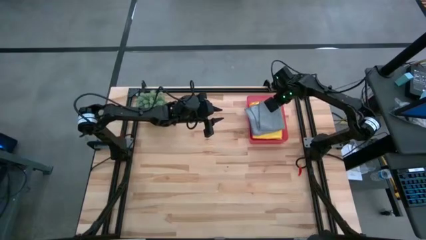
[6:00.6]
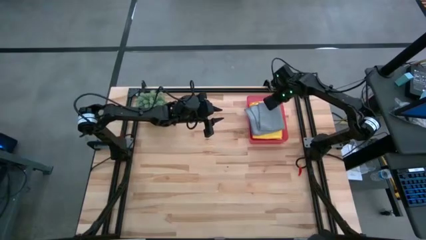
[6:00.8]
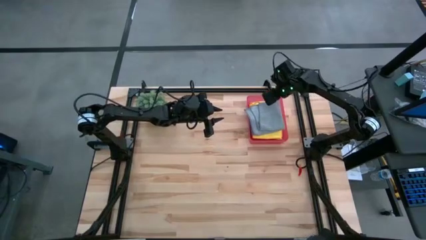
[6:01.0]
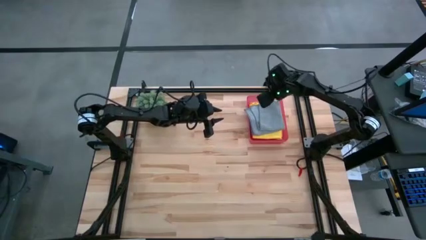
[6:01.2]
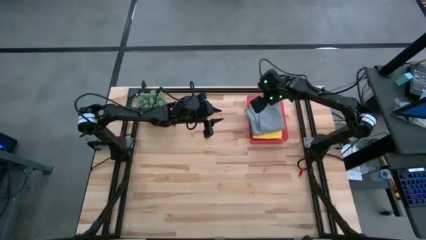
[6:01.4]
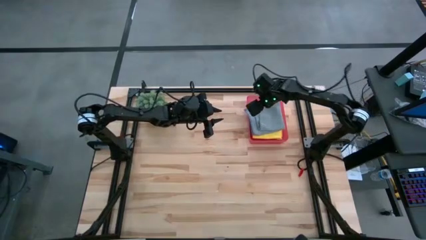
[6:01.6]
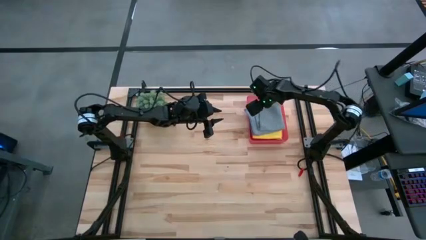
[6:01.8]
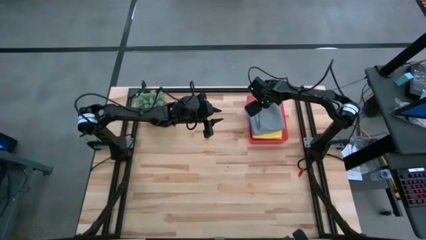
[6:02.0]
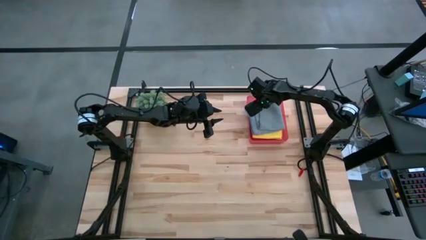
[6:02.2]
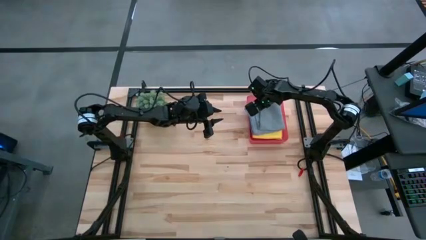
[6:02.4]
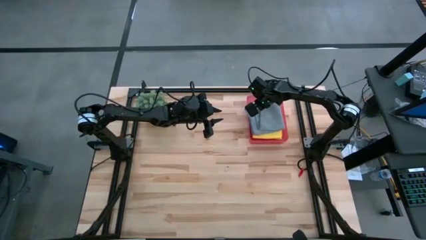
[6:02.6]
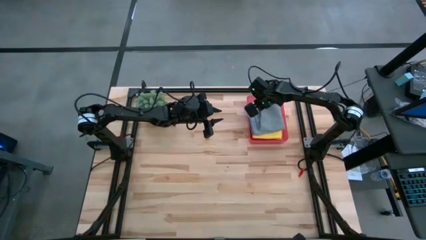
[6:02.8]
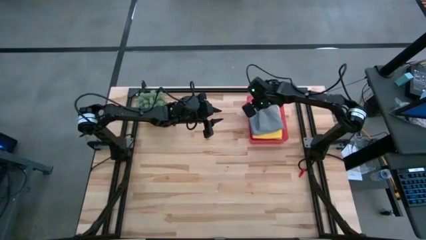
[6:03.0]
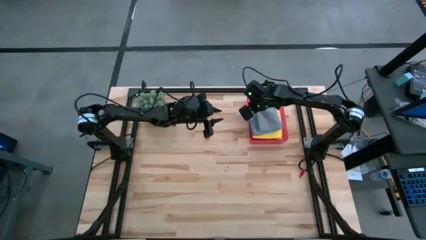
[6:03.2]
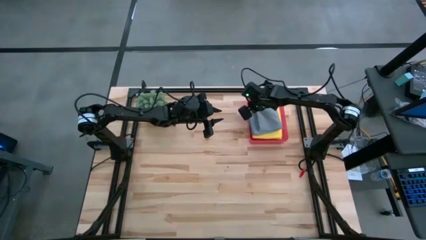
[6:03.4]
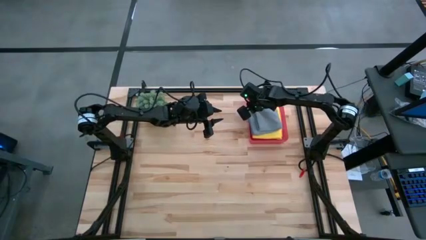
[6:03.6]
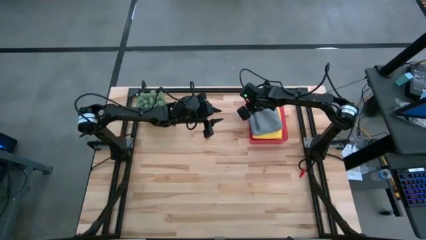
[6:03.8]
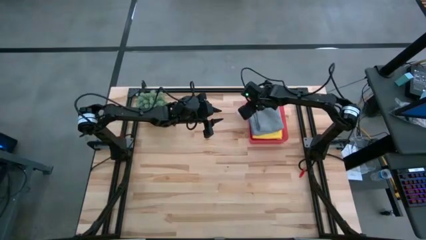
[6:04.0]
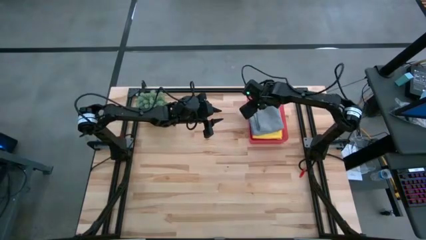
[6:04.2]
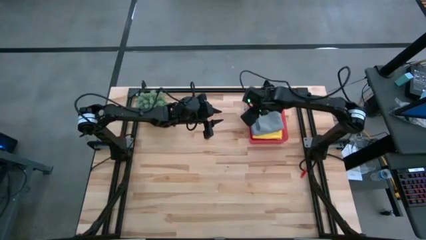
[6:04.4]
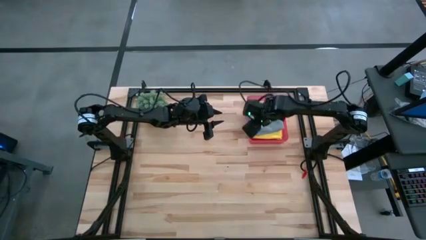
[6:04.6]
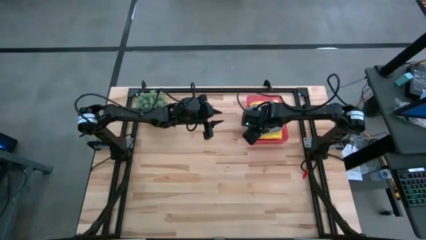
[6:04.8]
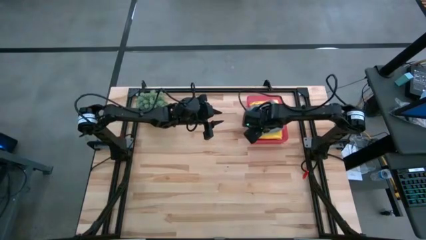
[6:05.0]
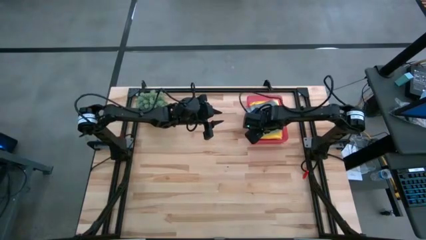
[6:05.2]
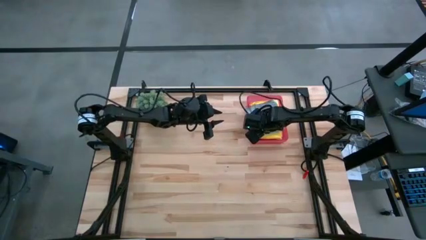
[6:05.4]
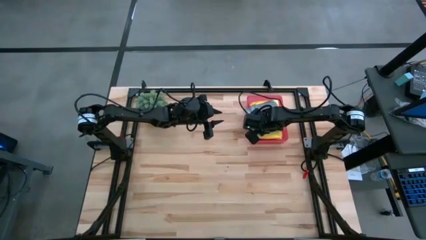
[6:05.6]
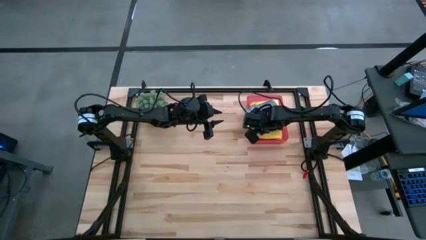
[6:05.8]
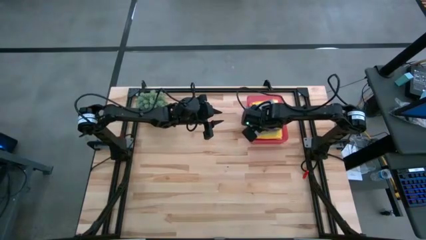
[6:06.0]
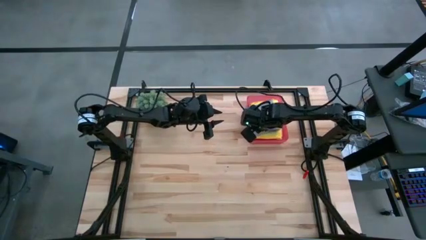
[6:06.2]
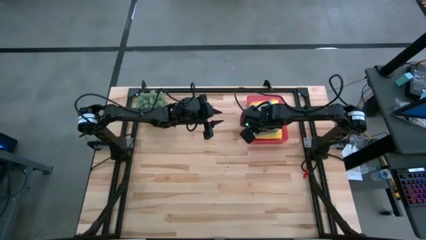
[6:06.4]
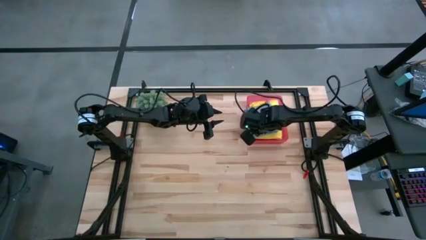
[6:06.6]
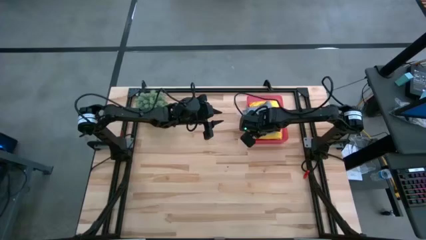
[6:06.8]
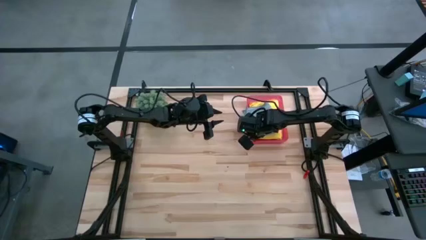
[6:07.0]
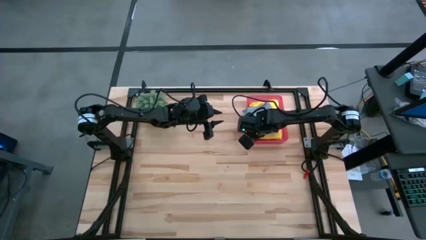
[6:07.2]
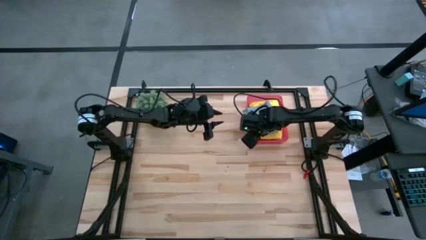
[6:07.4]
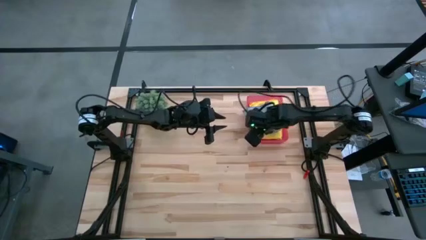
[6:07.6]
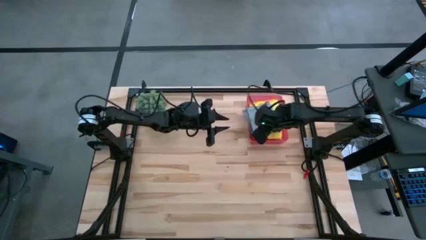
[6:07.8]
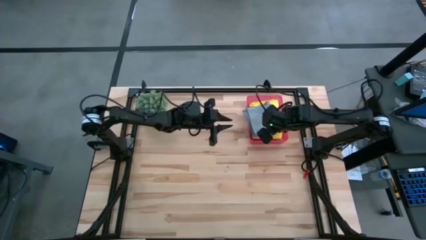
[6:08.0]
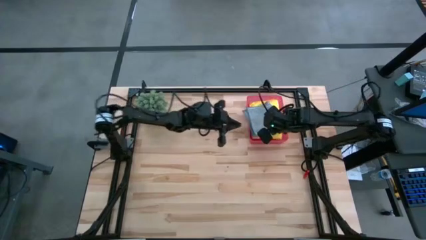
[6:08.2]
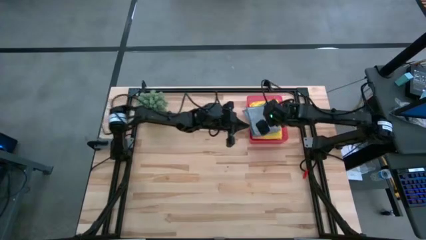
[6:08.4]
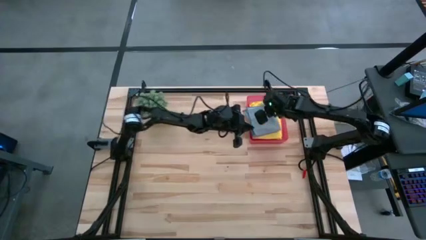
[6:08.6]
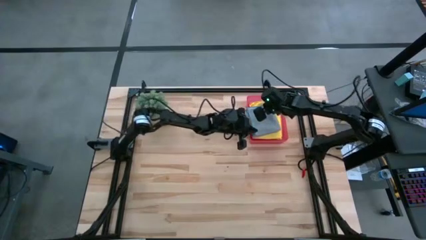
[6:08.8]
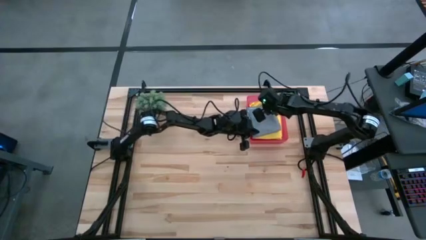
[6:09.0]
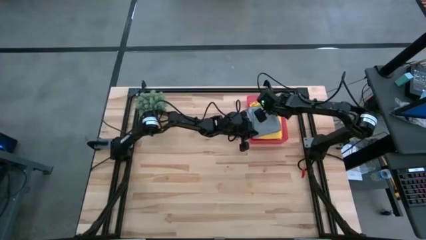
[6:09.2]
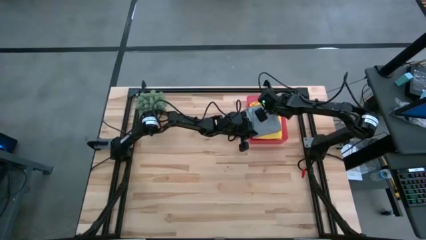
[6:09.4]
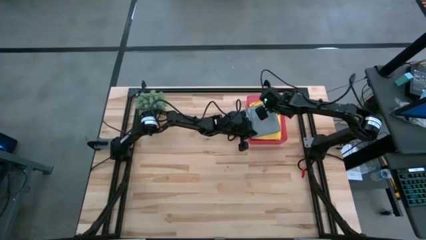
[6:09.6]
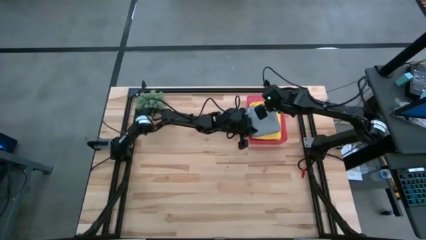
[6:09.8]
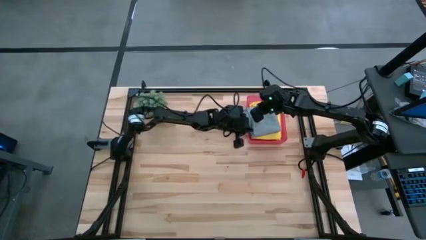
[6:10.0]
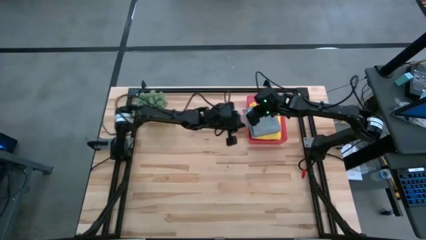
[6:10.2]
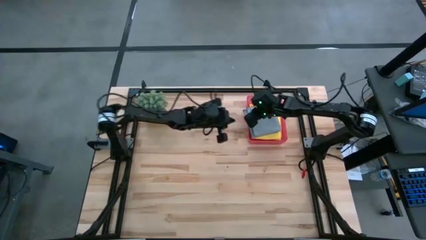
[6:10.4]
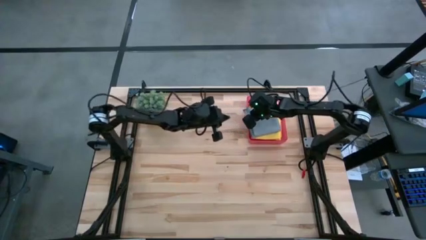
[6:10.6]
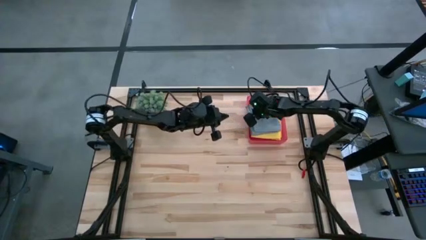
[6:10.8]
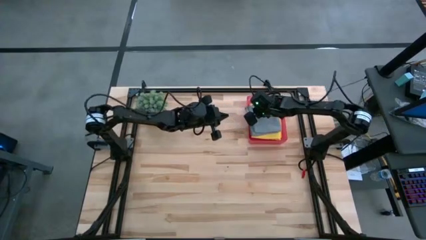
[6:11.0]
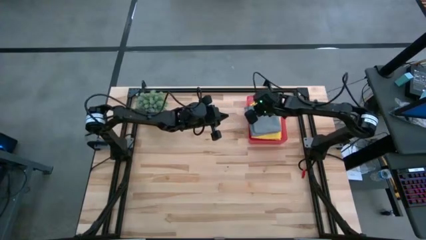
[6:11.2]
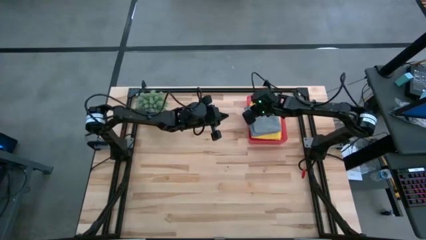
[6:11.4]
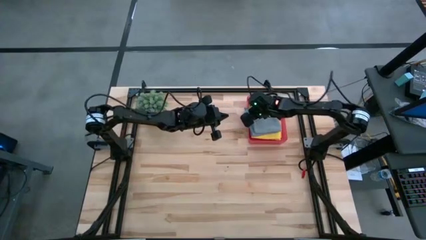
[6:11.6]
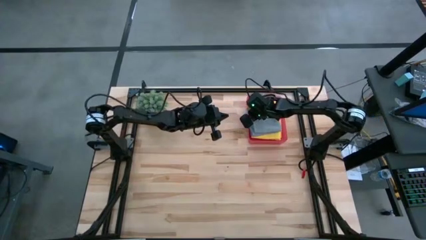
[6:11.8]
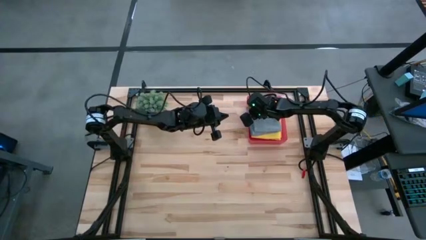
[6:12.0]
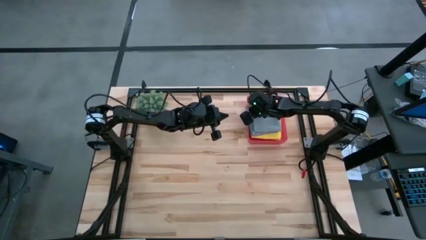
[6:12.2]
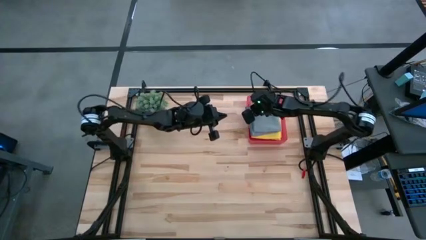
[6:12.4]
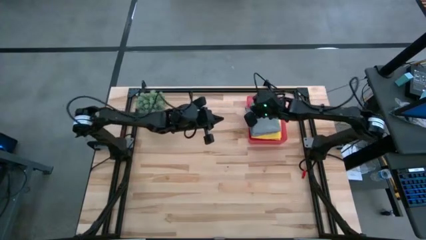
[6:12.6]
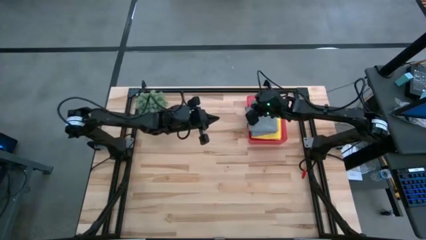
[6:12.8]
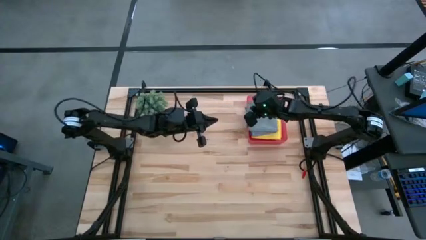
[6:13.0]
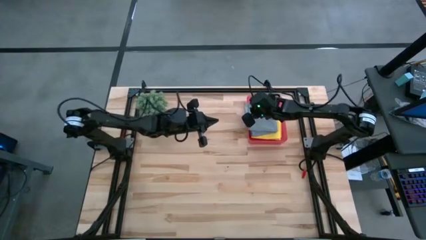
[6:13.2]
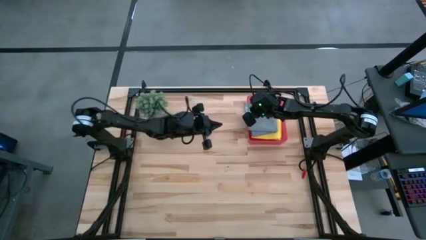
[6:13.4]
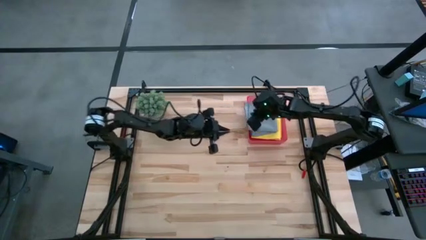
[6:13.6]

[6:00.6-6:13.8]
Task: Fold microfiber towels
Put the gray microfiber cloth into the pink bin
